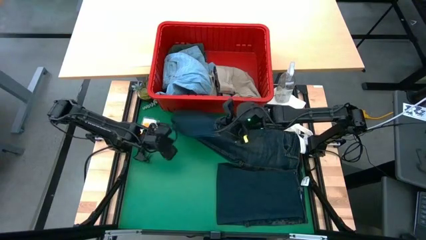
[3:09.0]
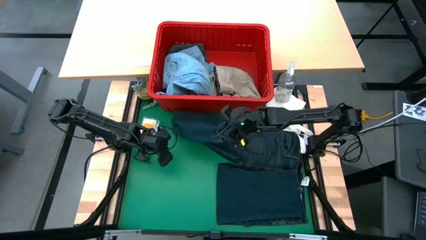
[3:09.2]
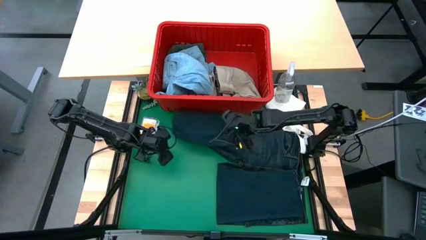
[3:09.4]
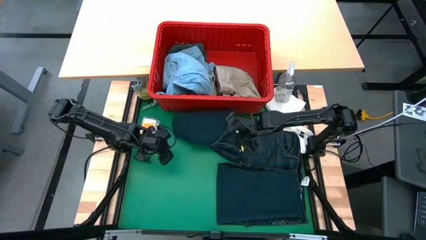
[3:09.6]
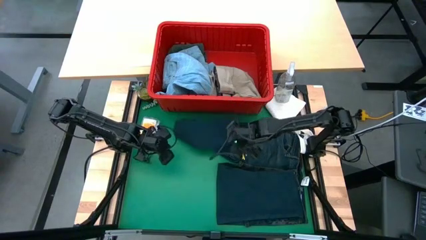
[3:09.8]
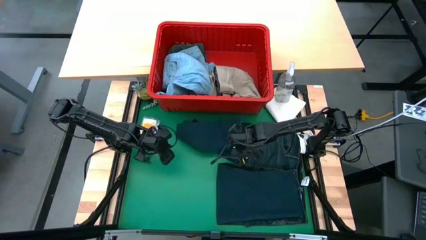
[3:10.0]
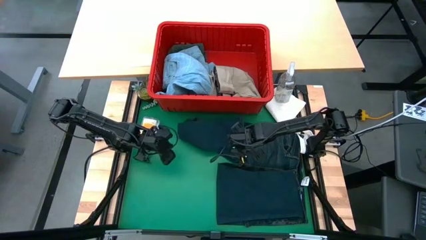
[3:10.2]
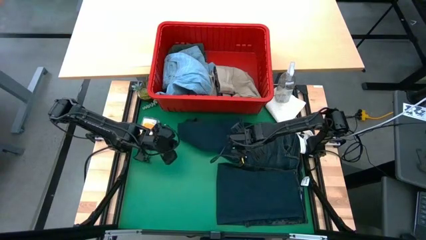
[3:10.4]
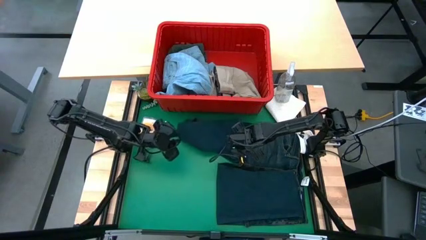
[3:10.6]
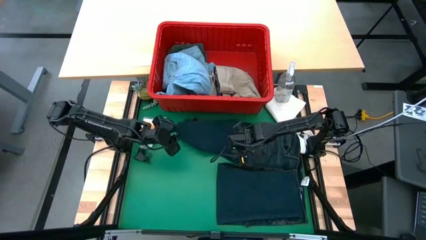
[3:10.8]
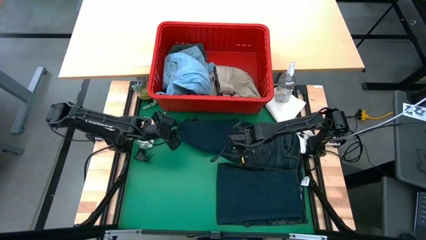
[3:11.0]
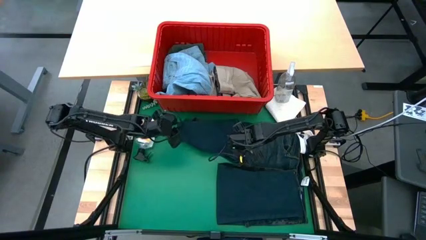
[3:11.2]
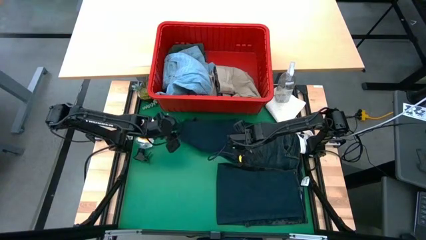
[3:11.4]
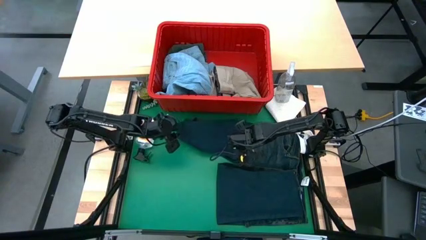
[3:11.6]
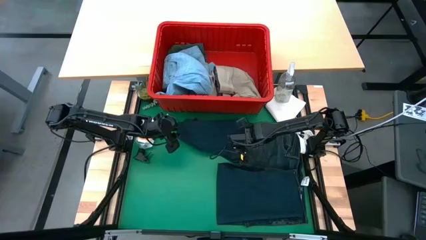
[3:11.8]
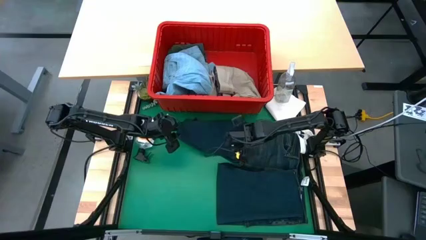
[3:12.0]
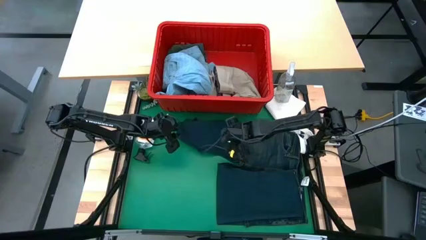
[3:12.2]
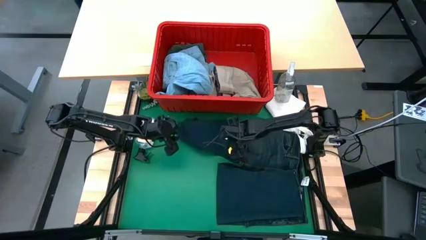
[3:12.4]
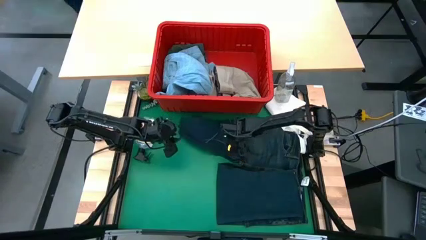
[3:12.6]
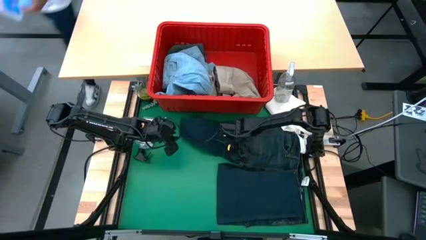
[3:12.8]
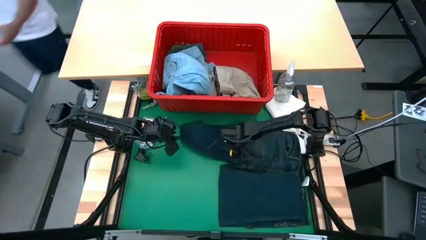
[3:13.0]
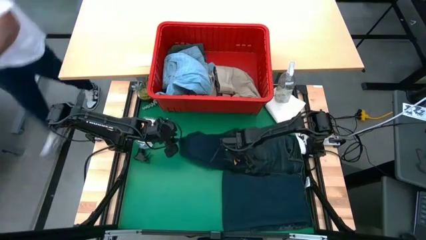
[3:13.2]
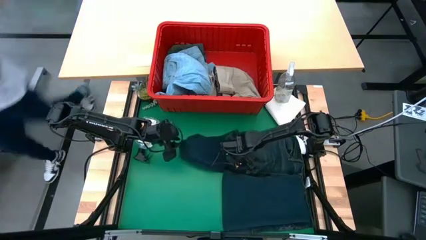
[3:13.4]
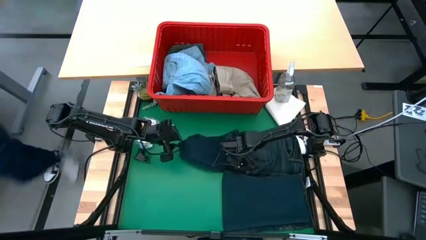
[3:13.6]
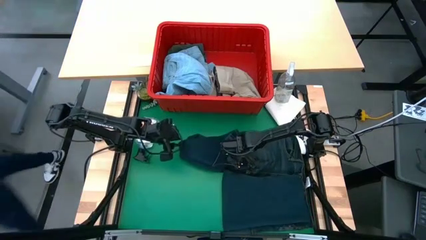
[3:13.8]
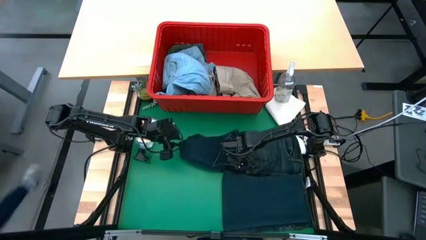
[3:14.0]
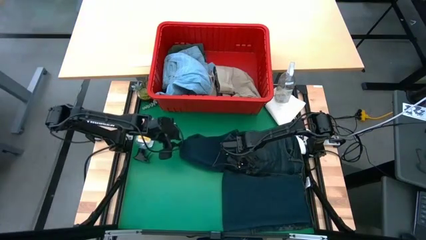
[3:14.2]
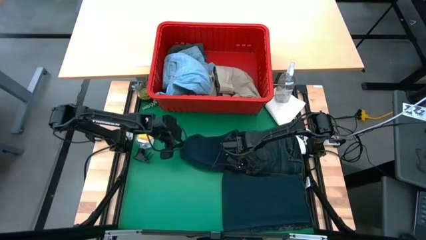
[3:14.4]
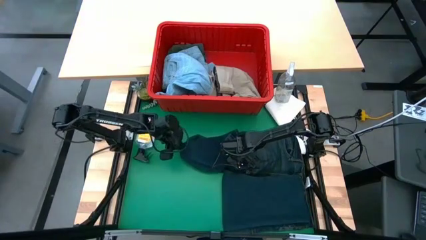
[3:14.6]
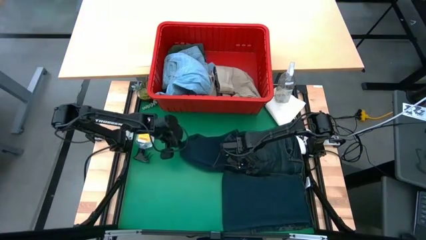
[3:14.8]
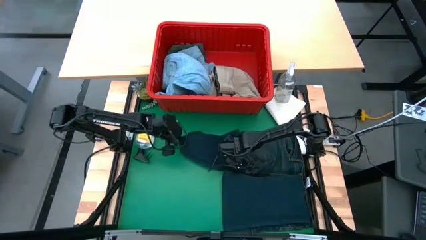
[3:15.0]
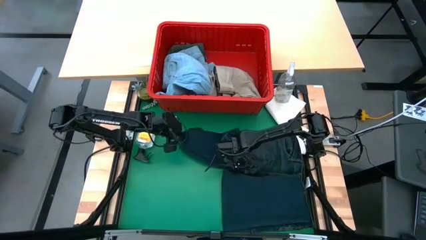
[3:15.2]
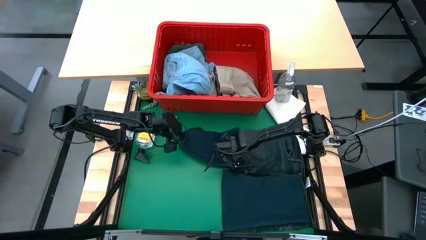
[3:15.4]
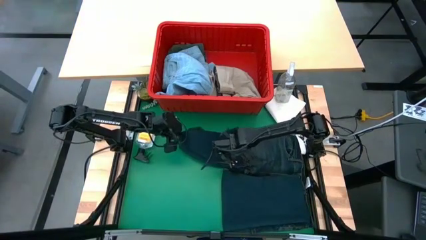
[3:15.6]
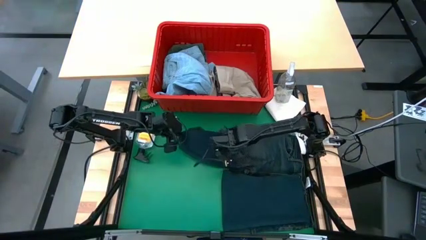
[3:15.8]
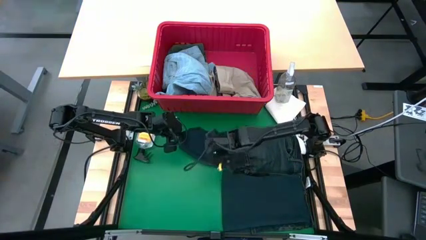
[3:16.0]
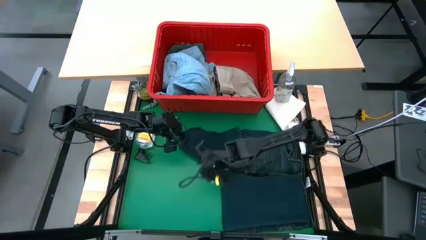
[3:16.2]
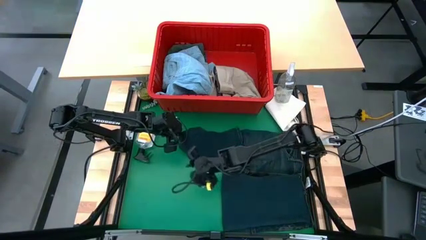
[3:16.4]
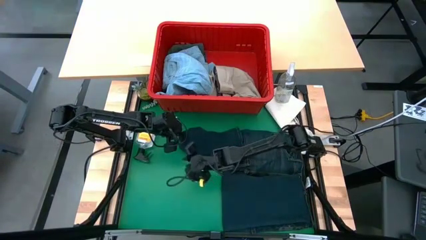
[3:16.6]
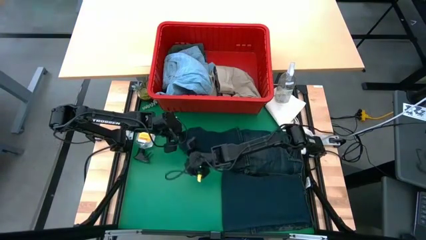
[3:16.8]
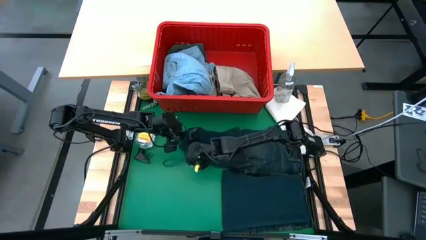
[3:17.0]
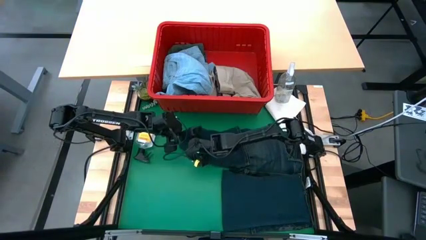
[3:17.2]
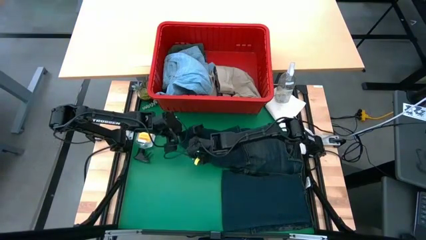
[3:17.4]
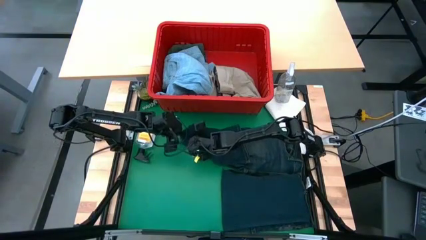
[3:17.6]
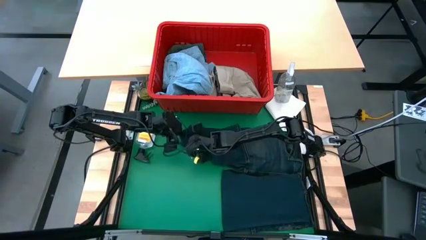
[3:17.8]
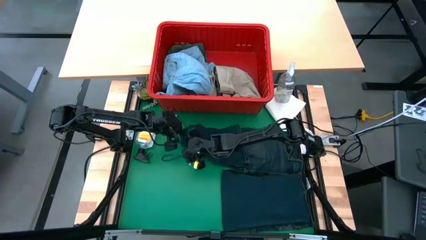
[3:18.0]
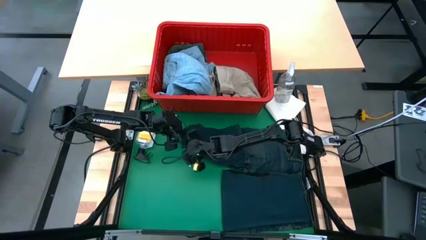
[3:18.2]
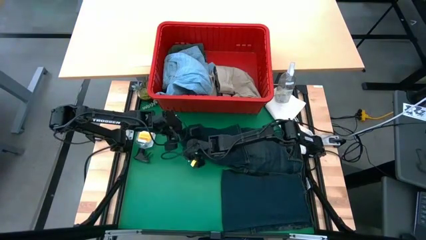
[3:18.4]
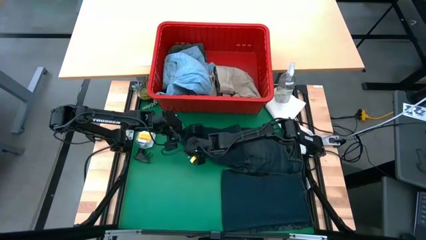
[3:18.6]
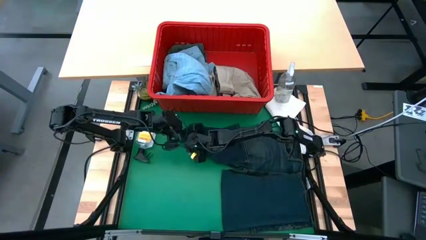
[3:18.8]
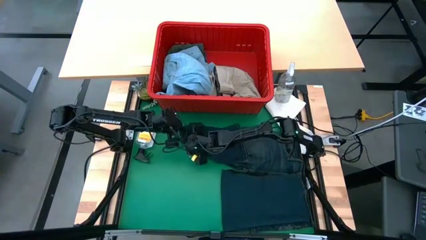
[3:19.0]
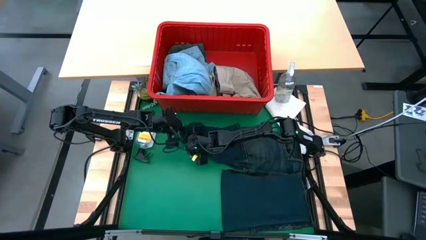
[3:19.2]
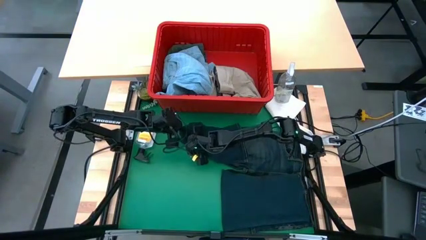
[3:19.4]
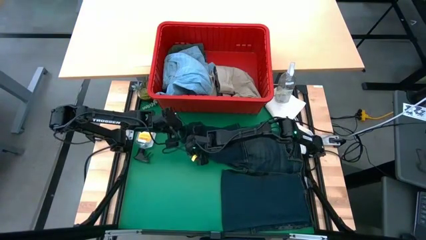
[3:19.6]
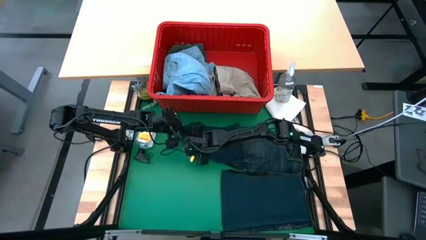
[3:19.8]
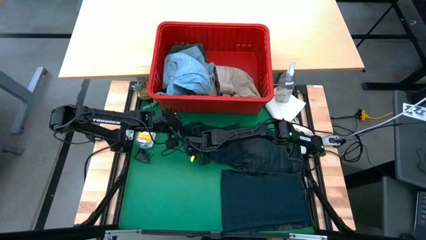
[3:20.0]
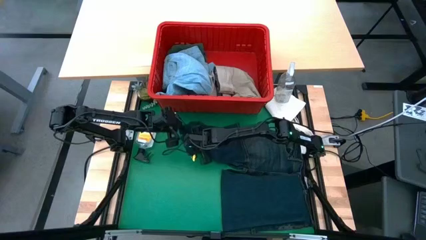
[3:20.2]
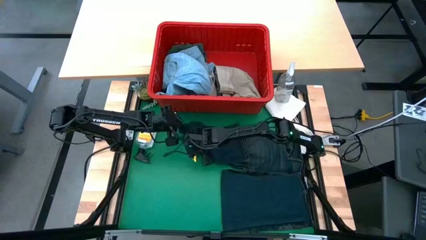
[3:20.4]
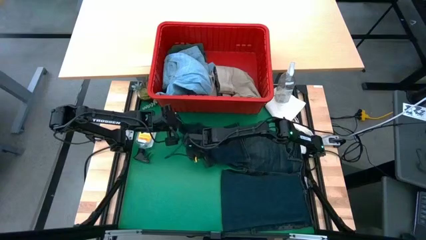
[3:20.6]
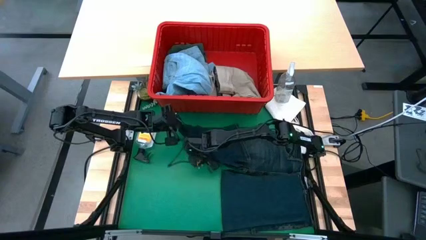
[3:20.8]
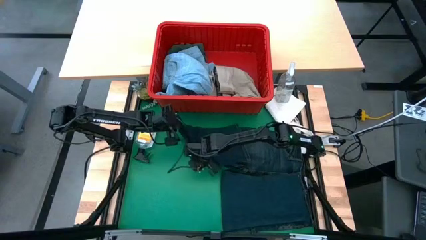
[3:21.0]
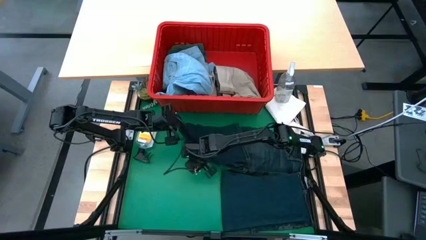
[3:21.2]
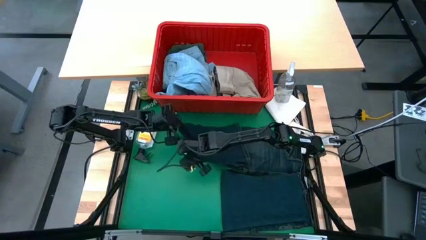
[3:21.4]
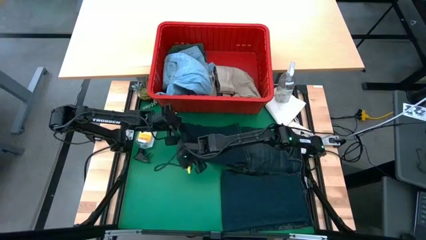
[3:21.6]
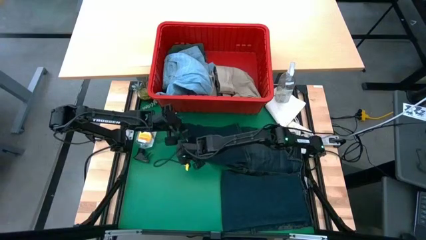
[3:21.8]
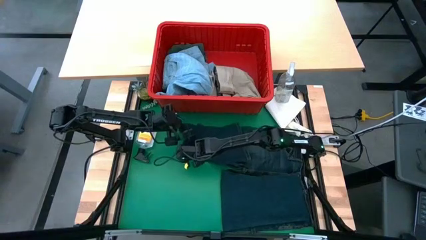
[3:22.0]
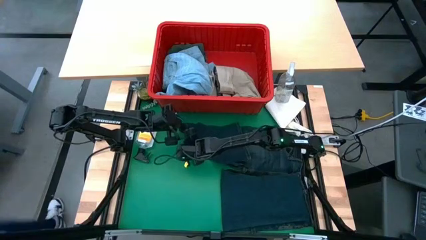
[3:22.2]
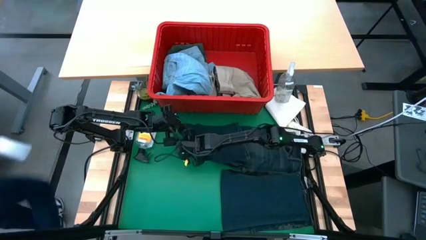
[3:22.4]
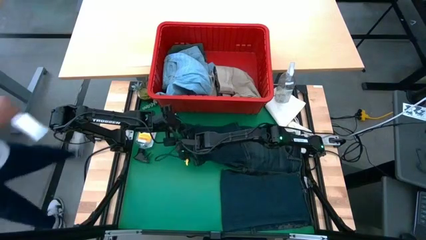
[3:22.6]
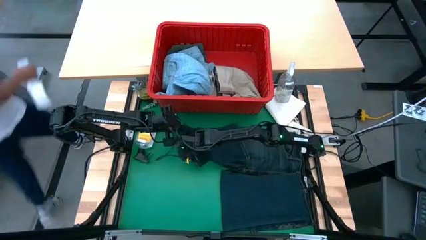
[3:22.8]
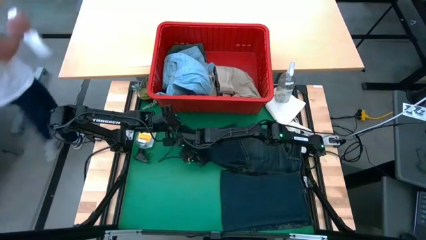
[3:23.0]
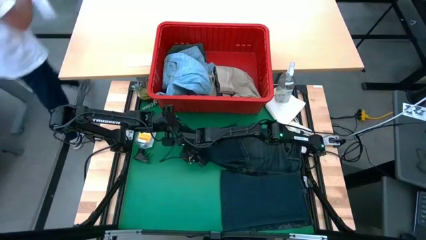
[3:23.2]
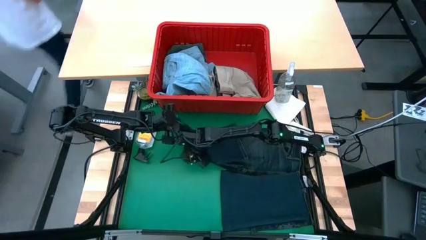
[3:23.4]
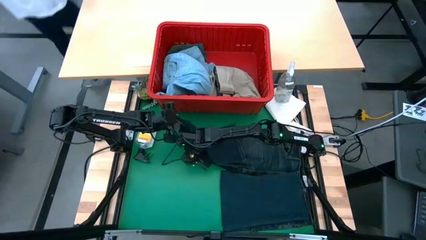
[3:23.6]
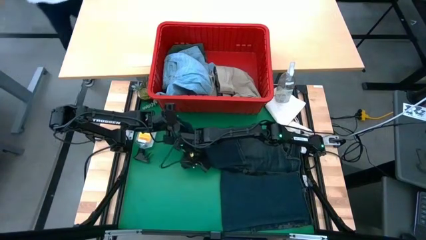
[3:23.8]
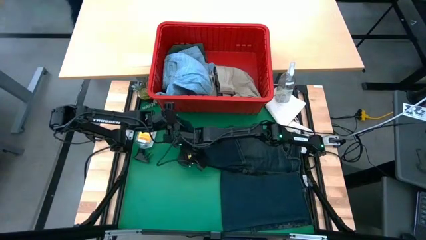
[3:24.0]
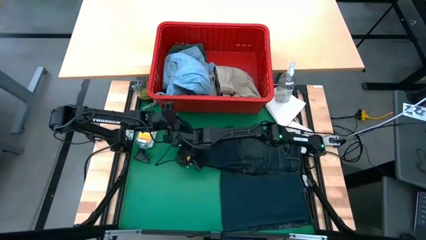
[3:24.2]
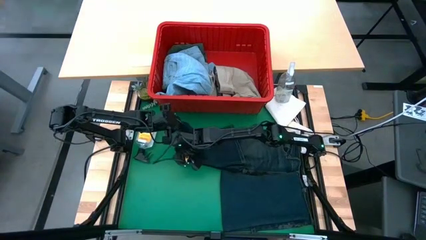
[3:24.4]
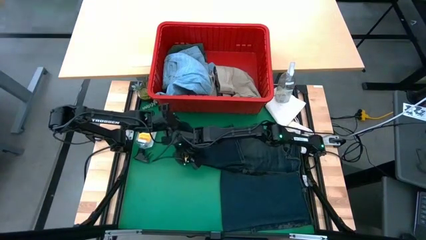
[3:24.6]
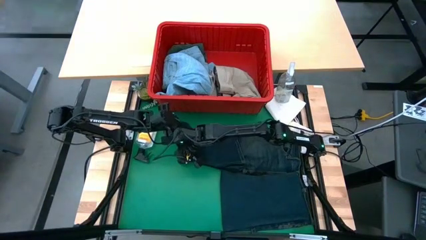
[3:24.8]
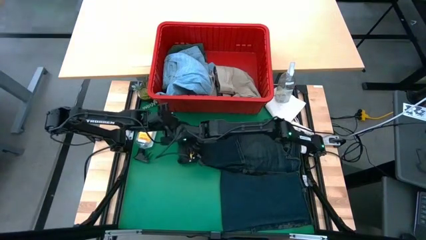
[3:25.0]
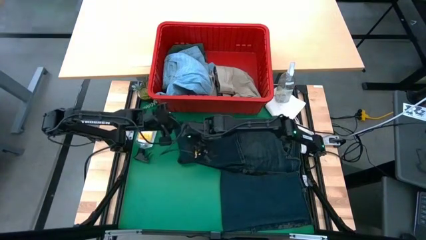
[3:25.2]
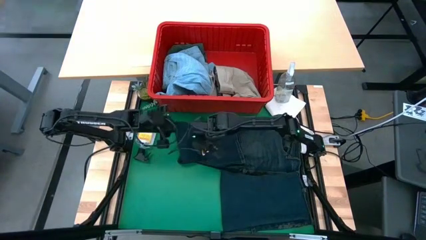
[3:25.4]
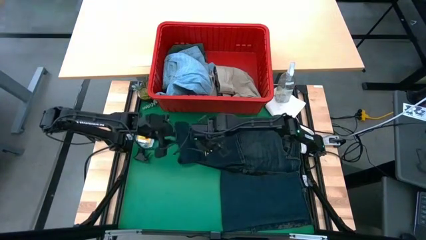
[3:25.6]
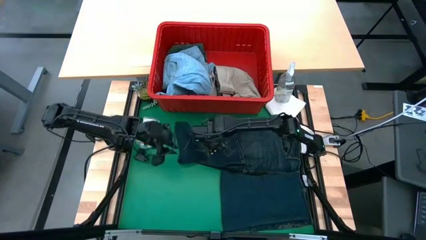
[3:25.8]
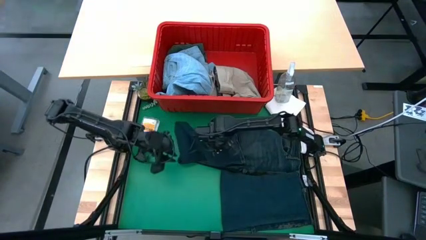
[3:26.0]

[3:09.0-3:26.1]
Task: Fold laundry
Fold the dark blue jeans
